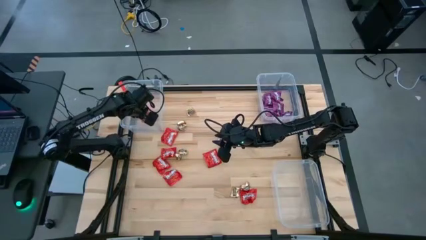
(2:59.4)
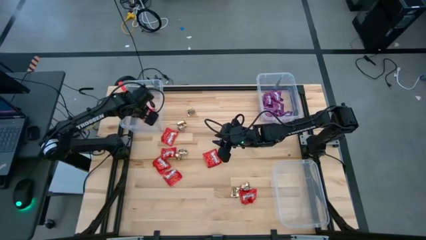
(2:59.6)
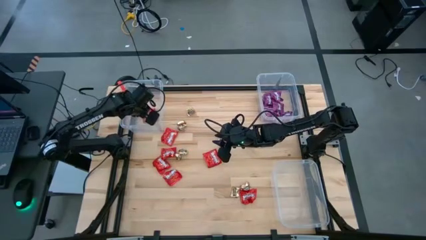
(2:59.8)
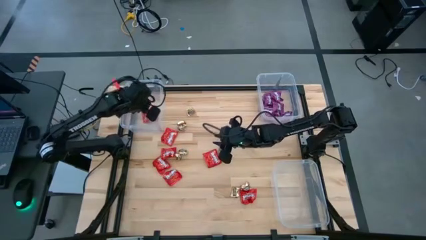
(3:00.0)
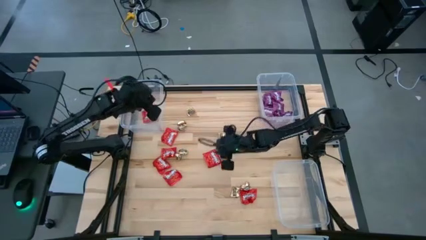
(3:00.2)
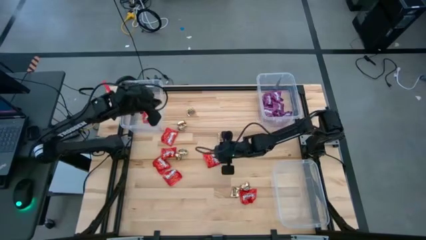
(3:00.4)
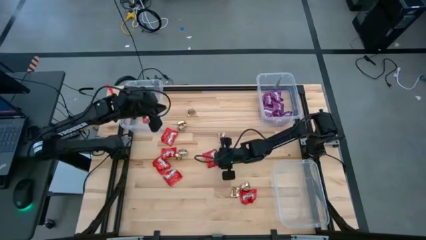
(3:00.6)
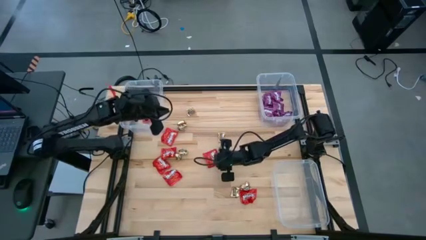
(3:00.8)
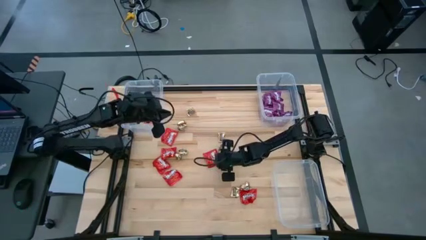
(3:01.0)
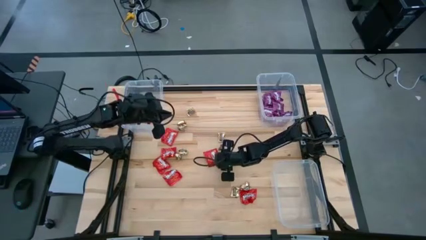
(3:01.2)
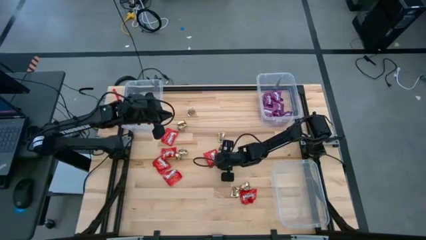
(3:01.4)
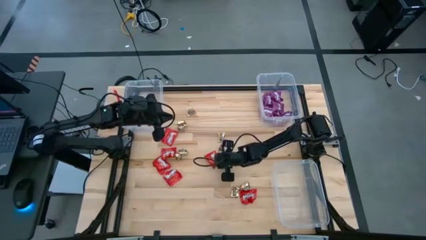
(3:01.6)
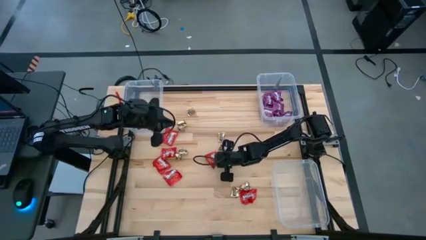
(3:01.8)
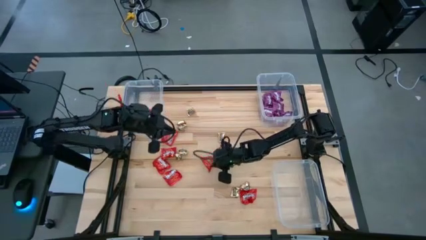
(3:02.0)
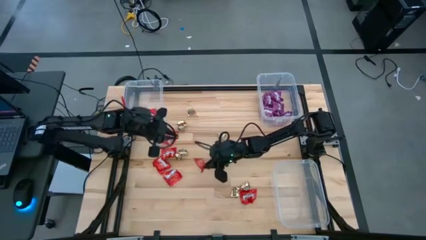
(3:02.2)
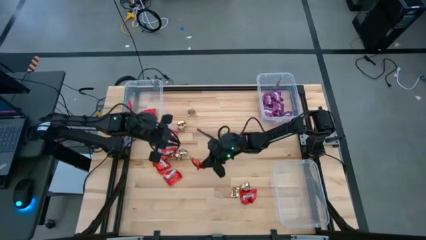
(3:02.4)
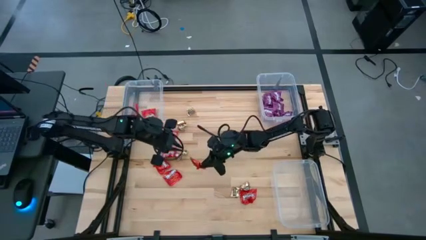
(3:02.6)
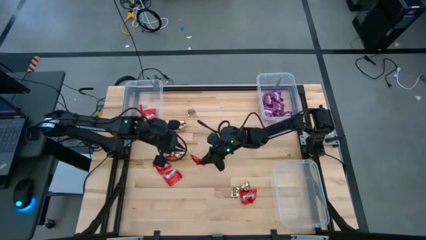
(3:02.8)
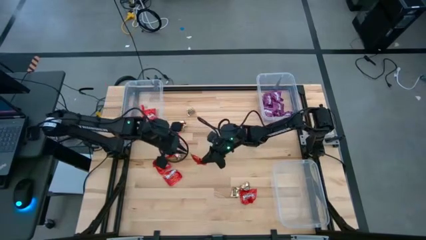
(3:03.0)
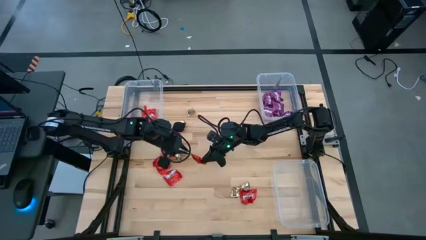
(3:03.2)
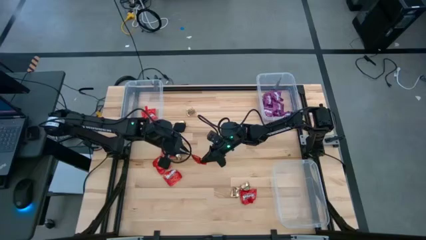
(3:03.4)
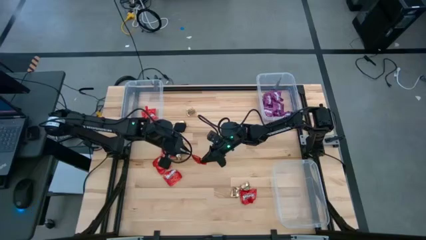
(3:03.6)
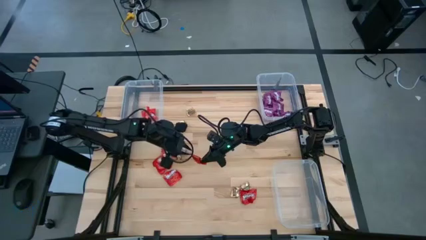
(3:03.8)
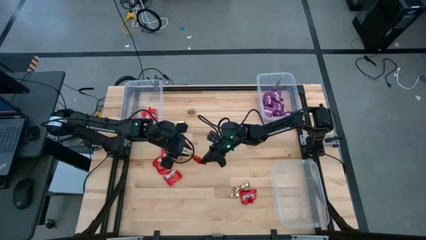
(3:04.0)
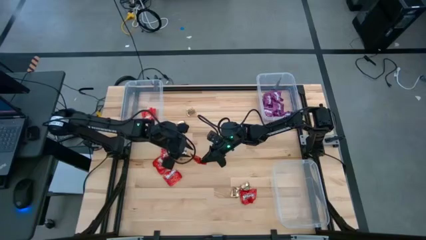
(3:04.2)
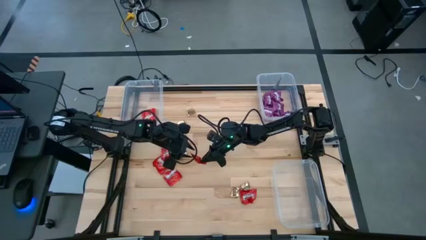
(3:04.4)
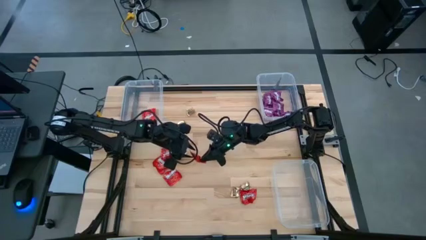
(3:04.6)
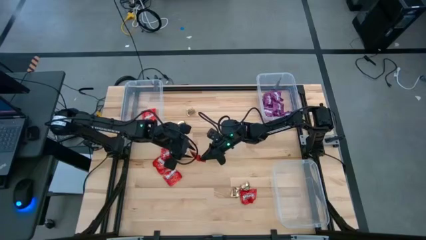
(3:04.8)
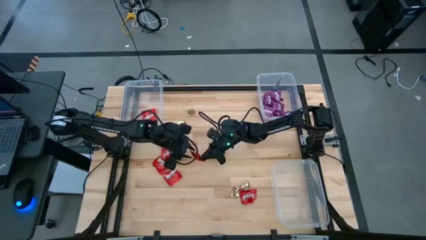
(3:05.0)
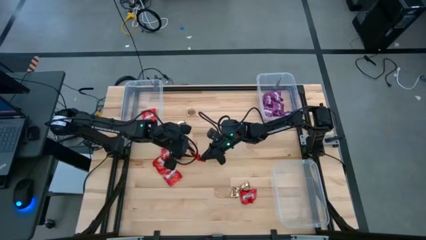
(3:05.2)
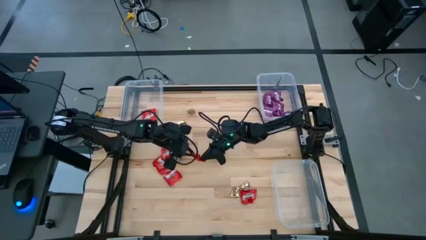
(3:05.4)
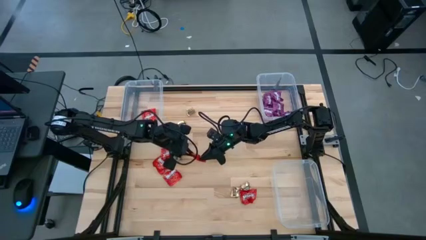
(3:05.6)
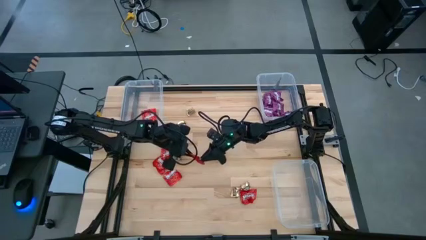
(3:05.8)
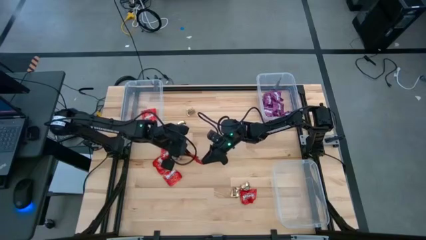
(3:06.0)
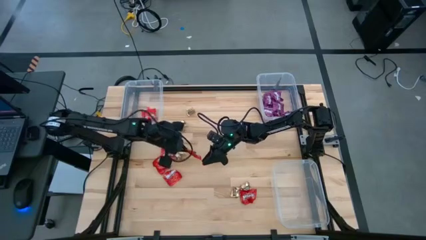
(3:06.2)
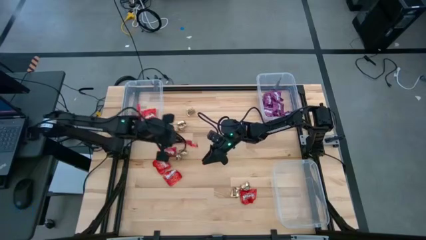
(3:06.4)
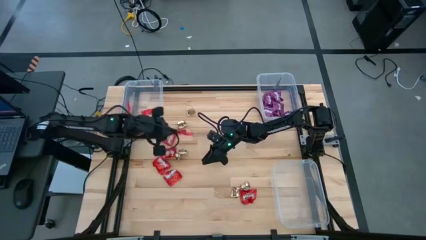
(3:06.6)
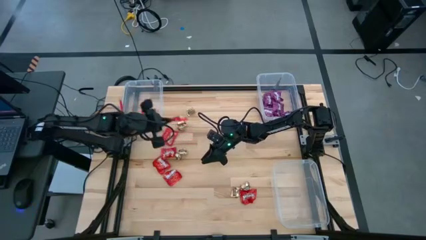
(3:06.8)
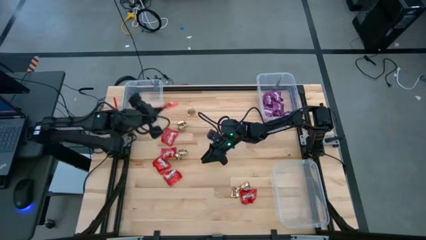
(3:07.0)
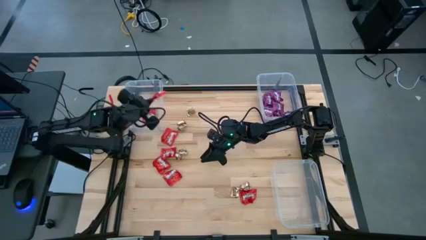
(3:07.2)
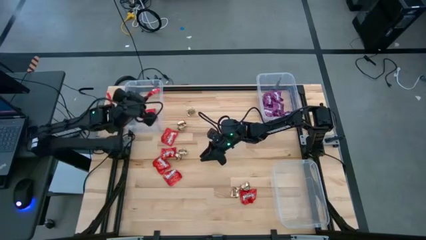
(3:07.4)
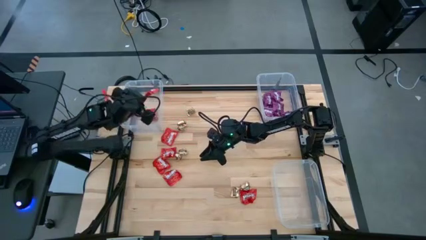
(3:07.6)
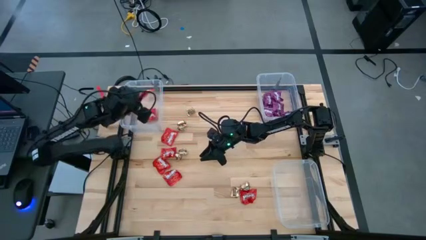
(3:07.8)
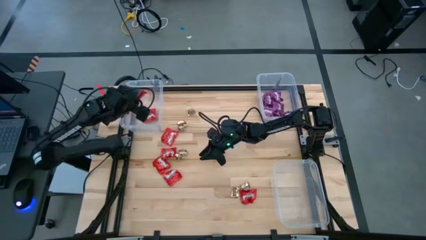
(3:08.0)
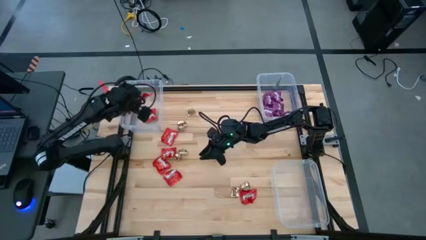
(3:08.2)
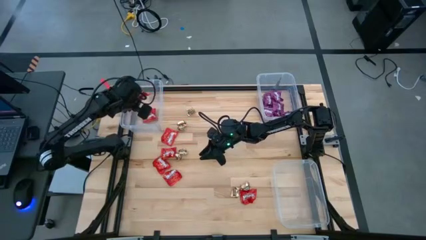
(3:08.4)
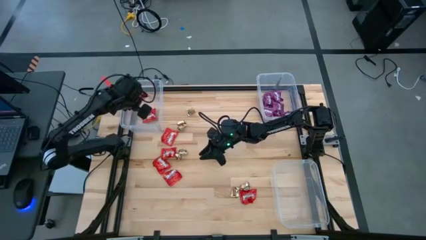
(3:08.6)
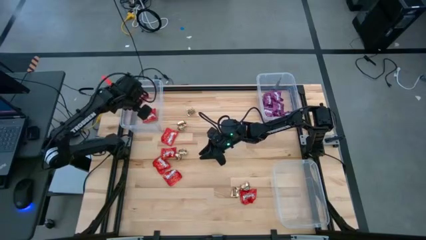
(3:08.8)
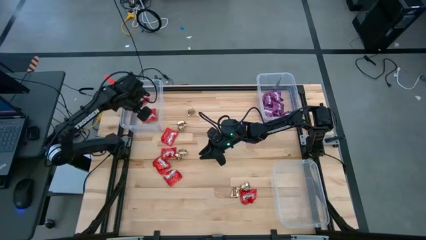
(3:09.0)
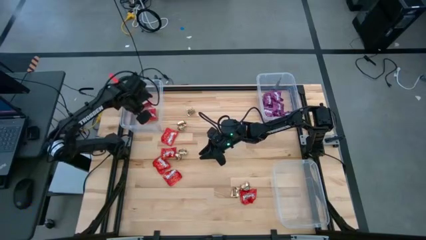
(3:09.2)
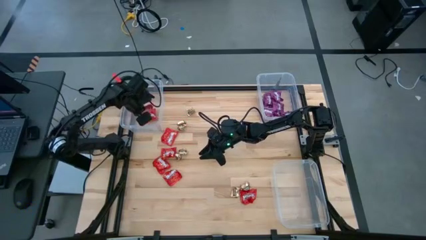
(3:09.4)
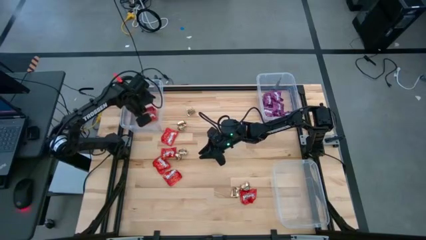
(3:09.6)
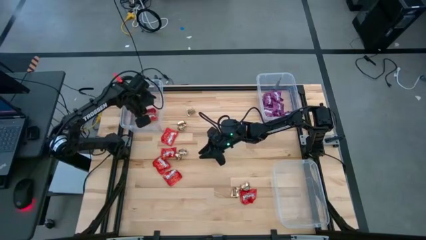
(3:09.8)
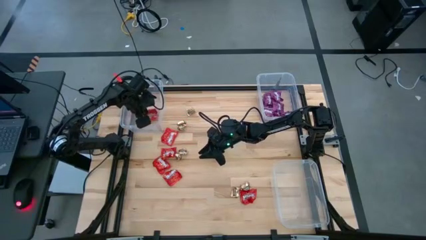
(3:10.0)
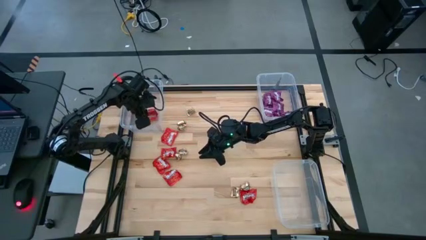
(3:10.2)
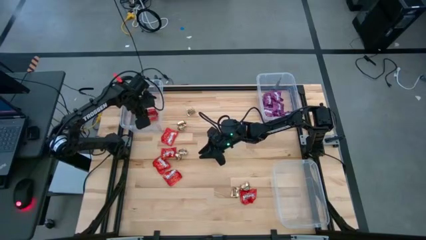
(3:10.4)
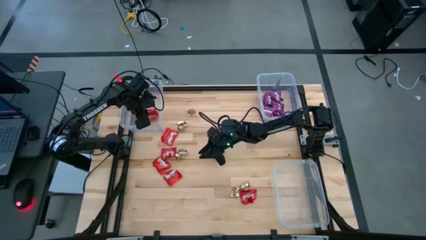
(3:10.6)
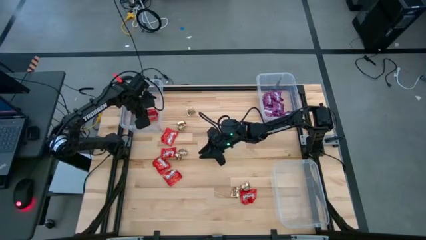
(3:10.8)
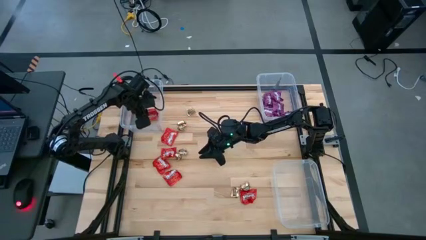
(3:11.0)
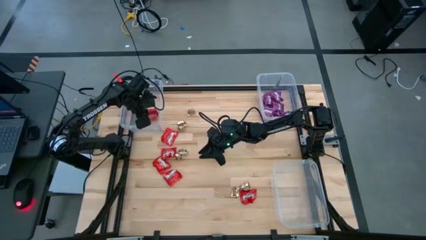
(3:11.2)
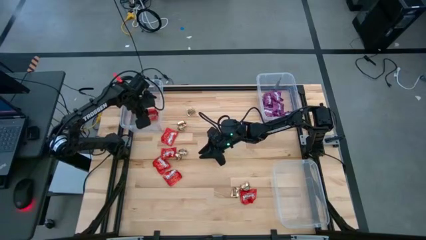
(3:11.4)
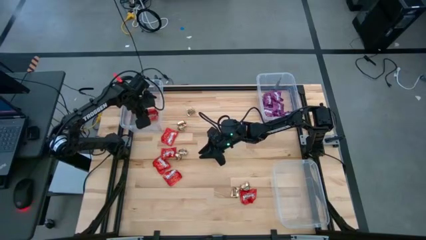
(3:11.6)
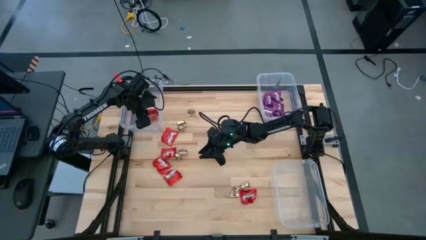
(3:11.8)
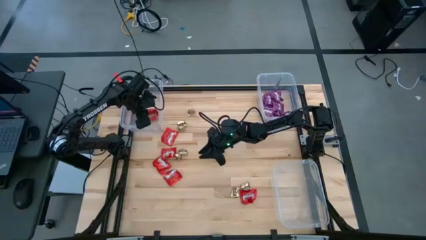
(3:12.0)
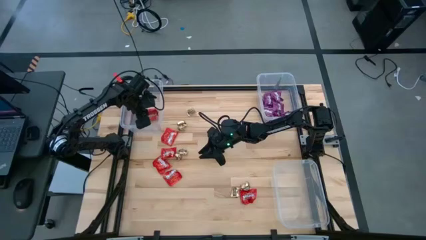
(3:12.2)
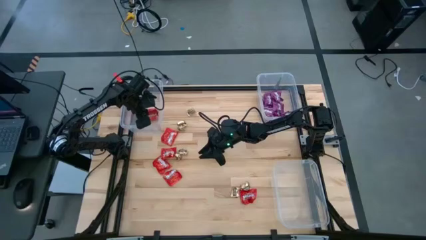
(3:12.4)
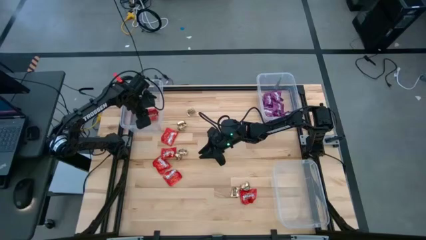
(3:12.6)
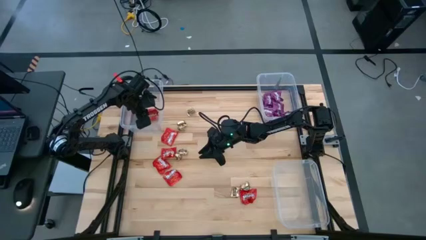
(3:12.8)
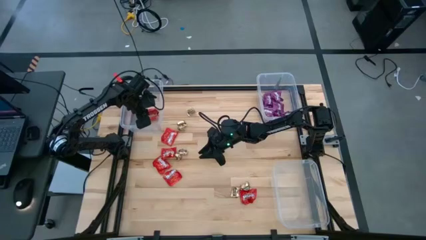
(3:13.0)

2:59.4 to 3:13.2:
Task: Sort candy
Put the red candy into the top left transparent bin

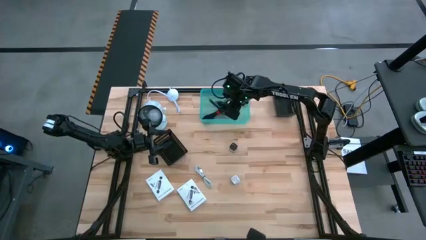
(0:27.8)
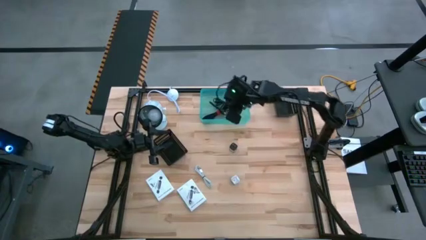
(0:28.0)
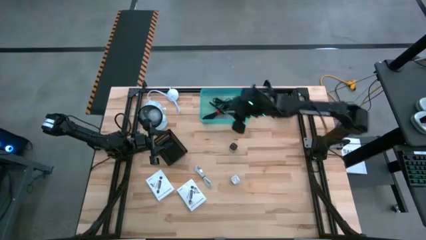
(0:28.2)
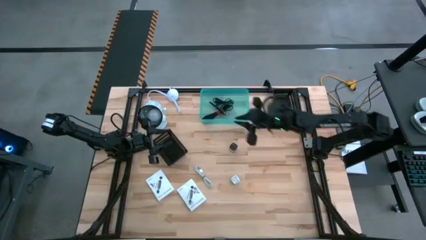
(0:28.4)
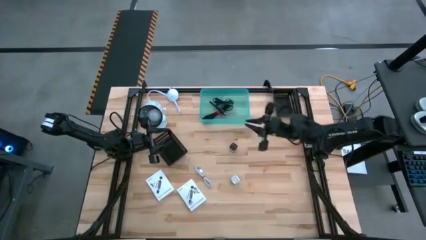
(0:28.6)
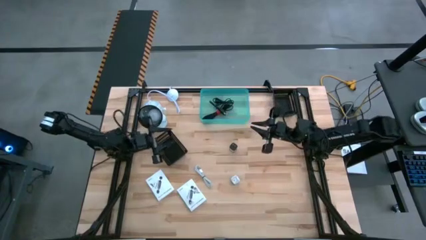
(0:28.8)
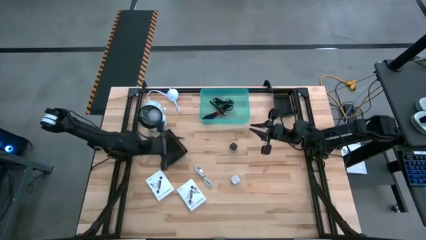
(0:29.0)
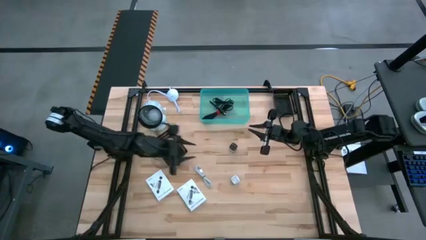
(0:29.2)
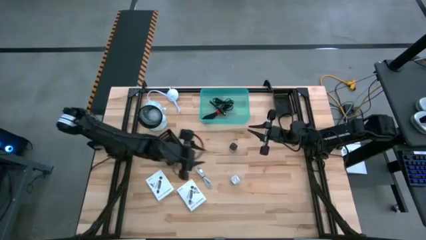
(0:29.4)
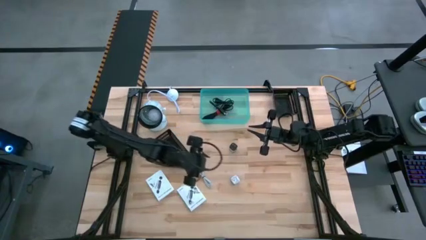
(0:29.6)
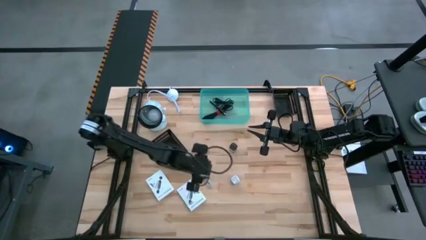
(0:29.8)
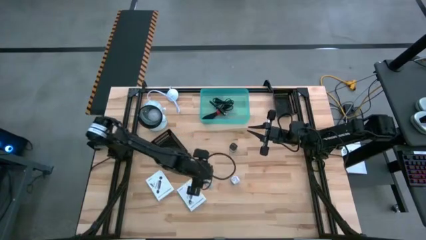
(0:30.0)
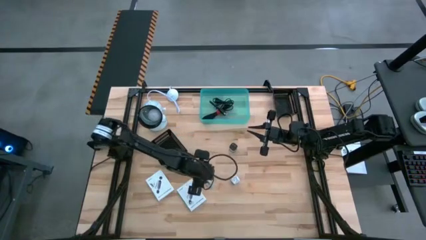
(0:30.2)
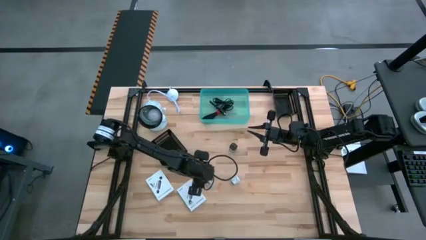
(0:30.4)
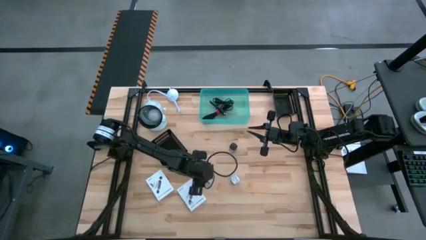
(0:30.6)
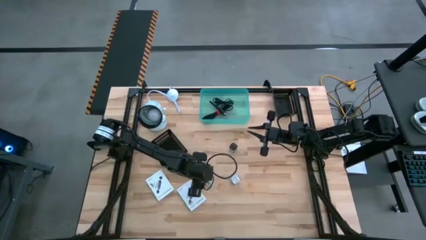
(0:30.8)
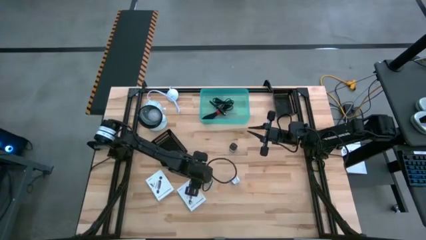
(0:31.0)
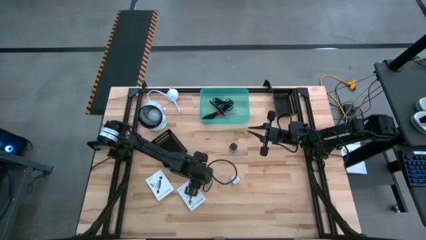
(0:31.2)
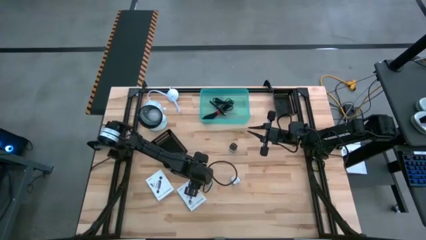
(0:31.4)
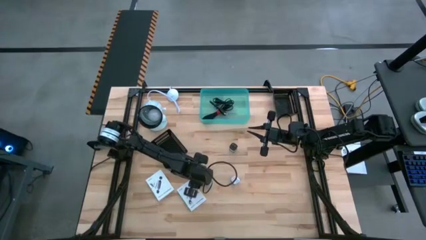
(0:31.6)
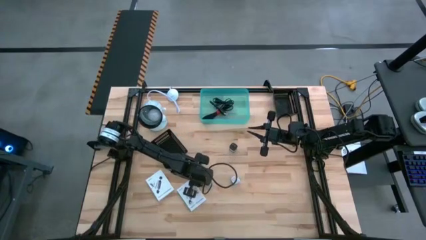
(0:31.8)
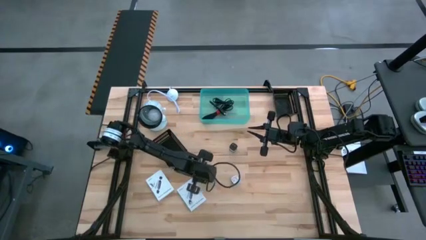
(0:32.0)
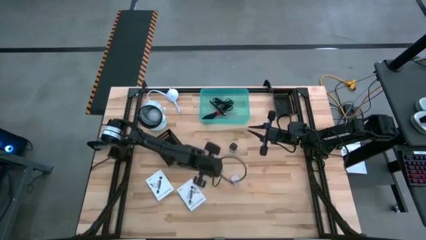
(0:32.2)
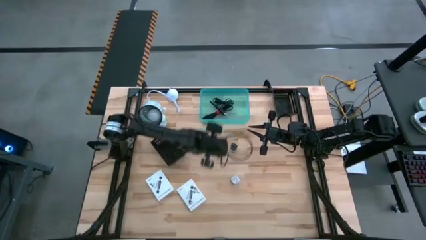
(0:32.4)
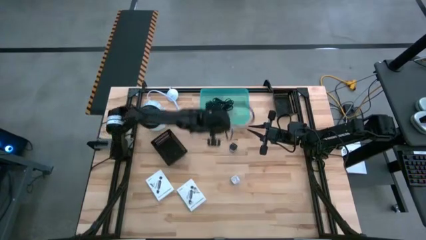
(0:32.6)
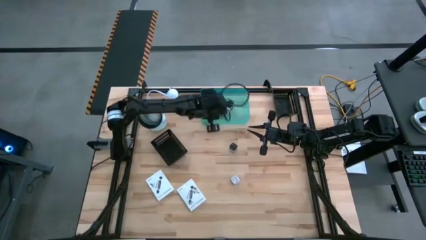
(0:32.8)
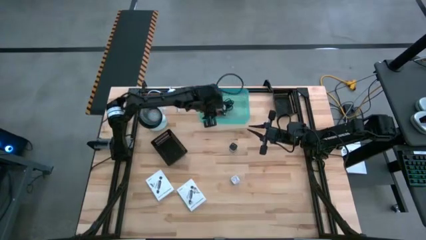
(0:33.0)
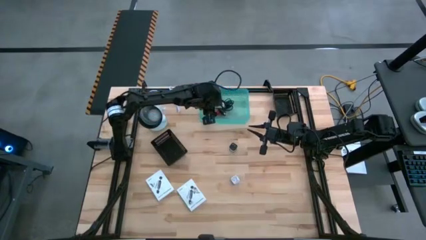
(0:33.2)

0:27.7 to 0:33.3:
Task: Pick and place items into bin
Put the white charger cable into the green bin
